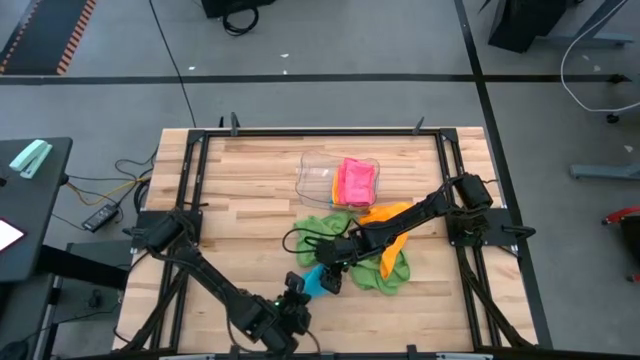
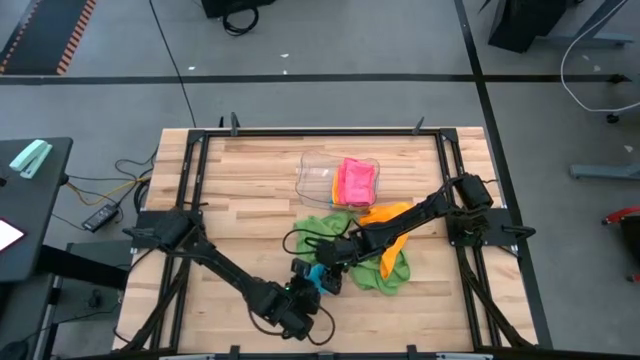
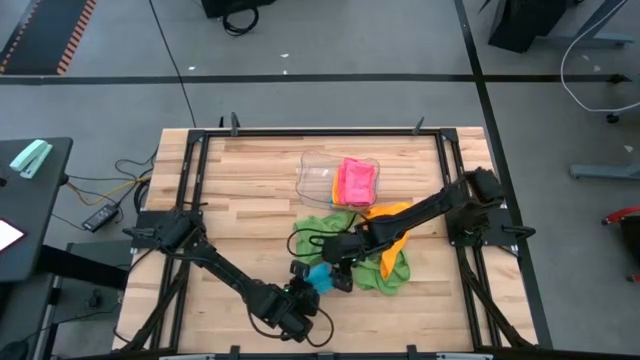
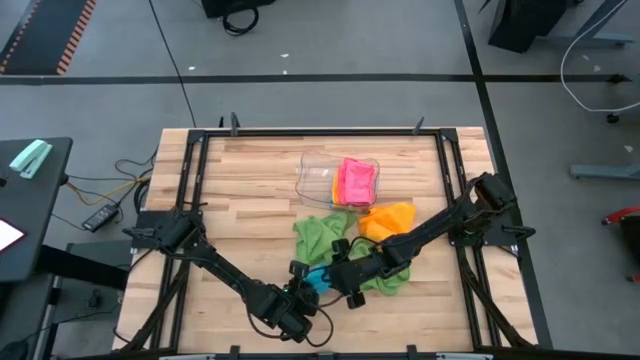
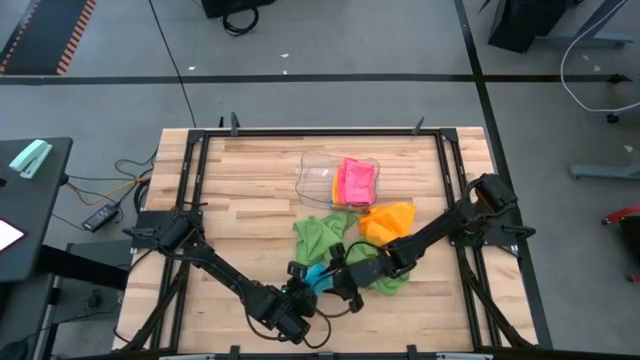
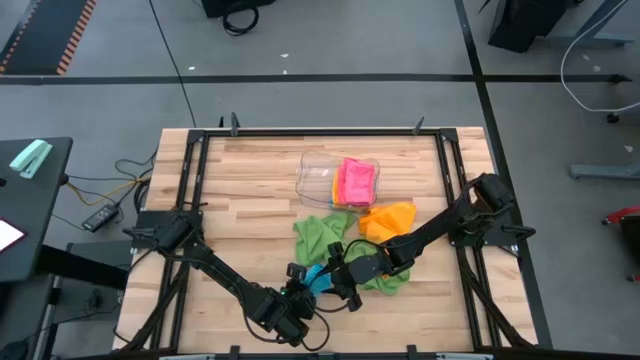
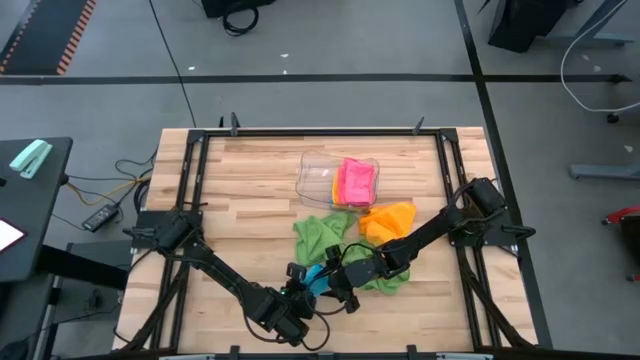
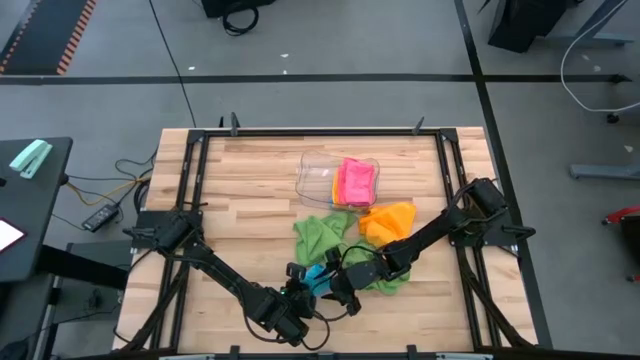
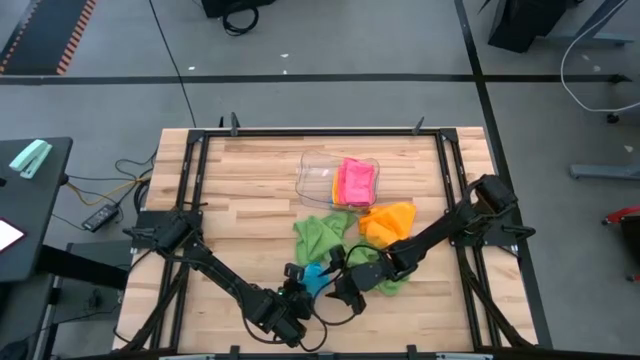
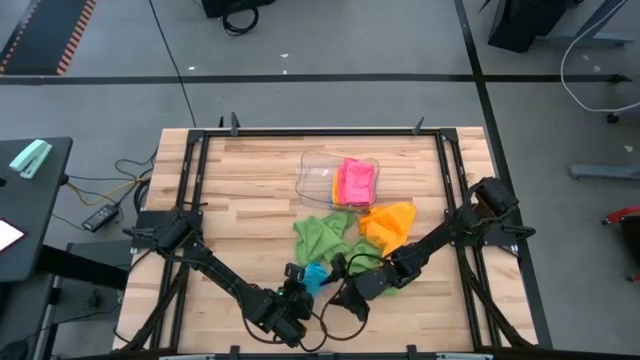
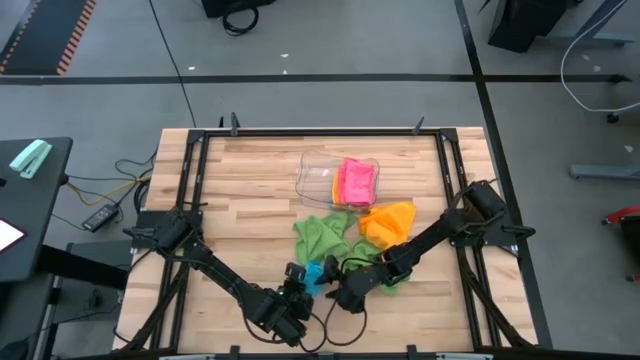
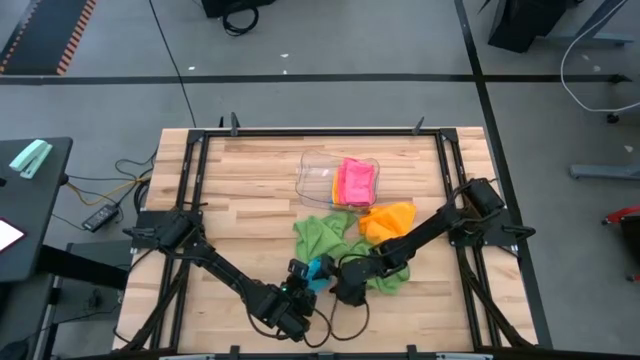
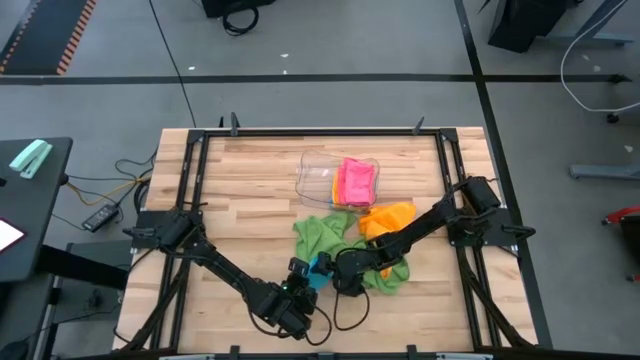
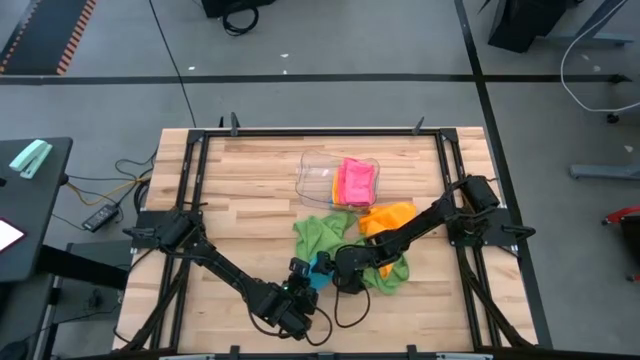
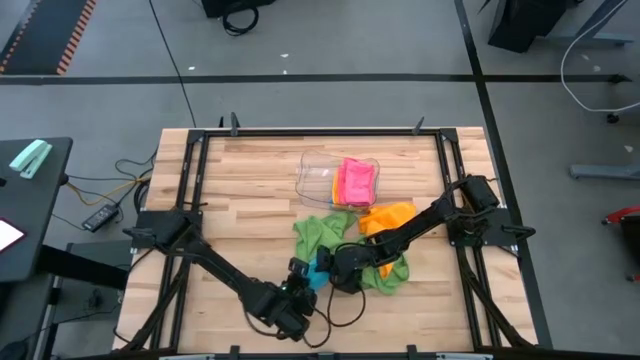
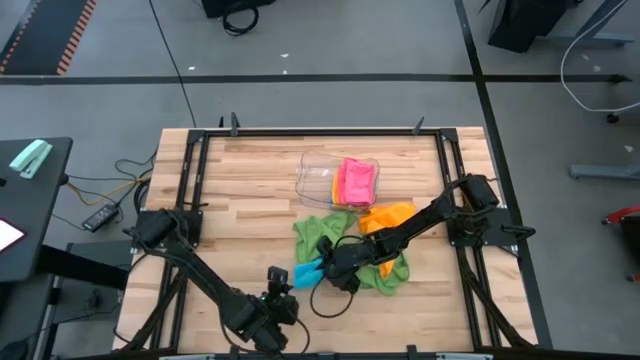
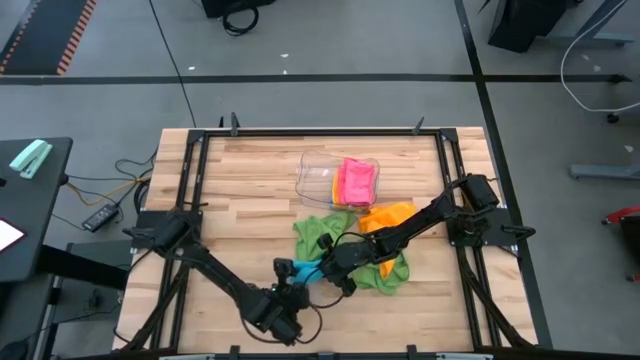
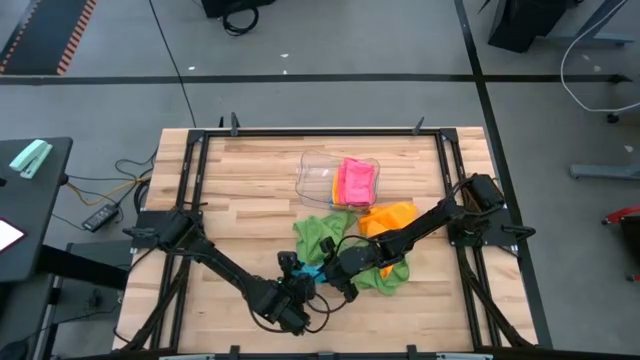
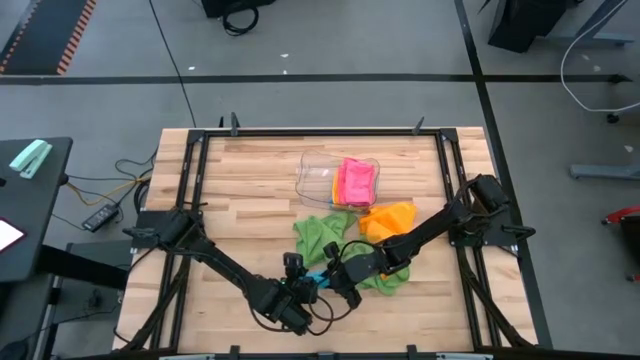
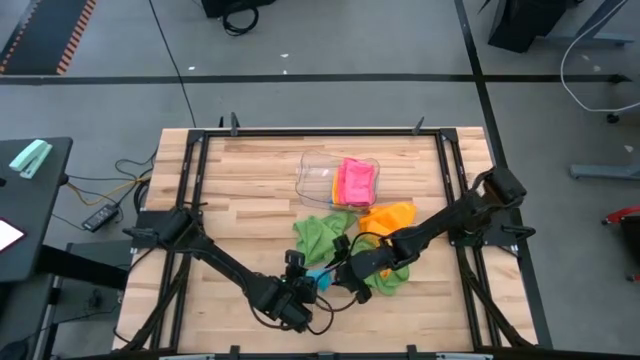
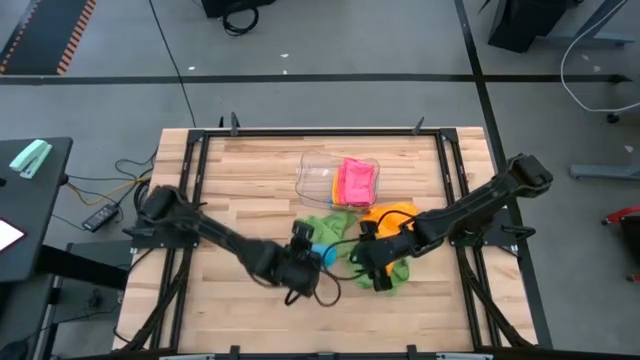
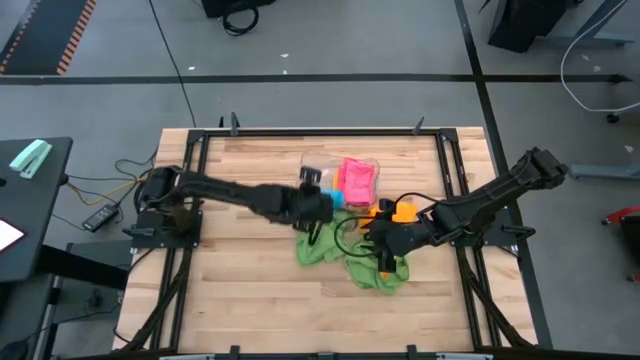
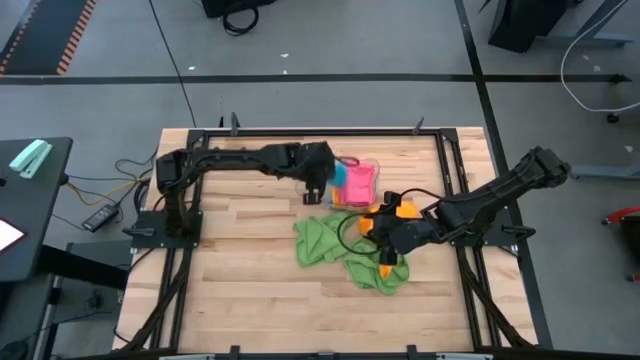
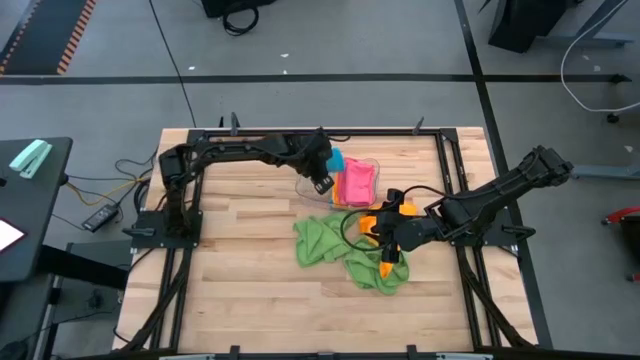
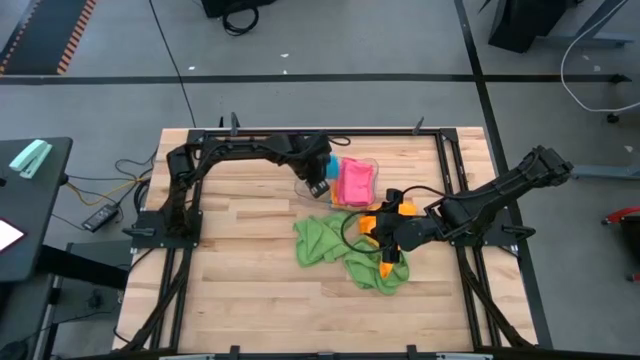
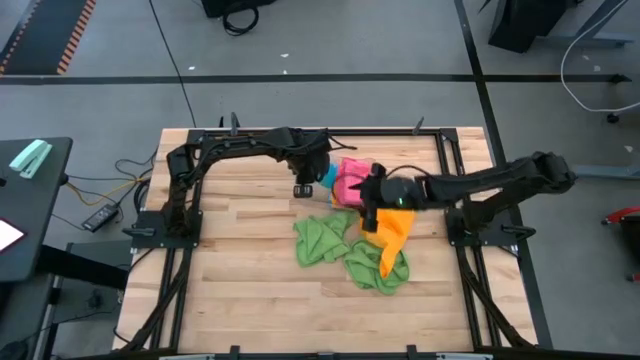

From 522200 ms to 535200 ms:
Task: Fold microfiber towels
Put the folded blue microfiber cloth into the transparent bin

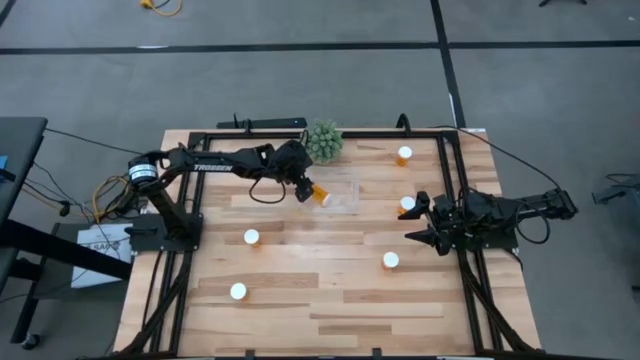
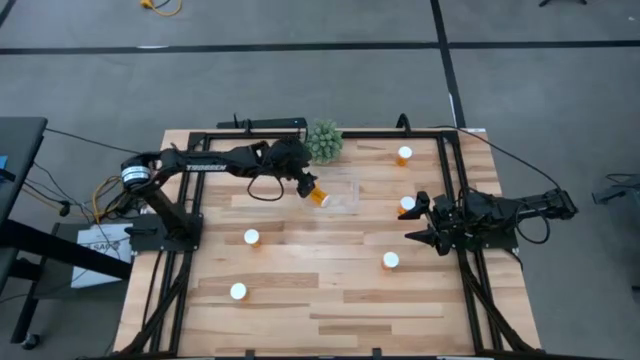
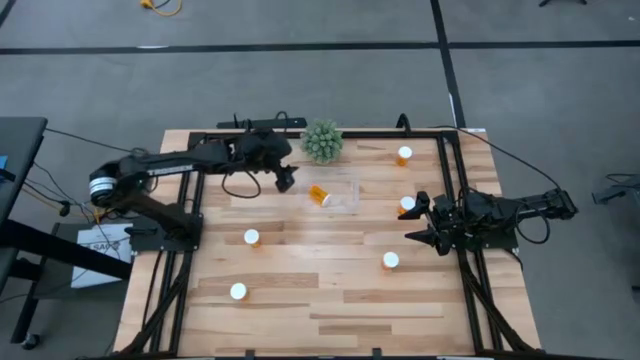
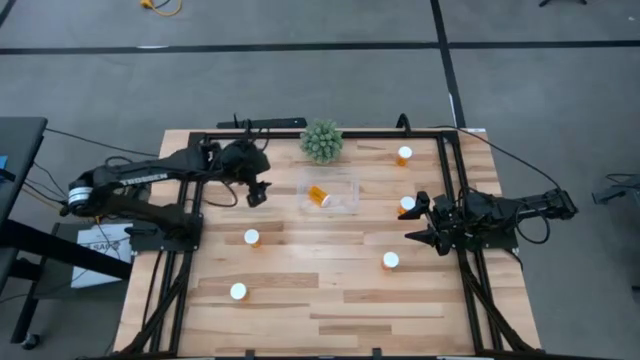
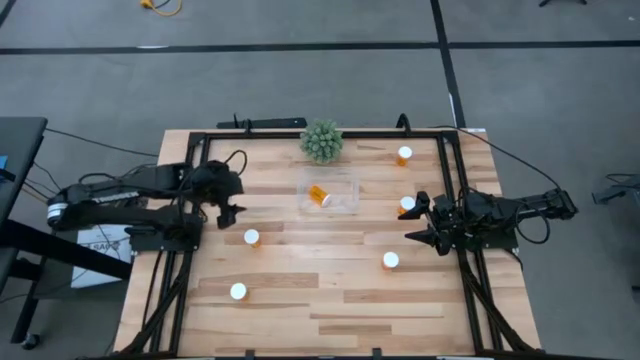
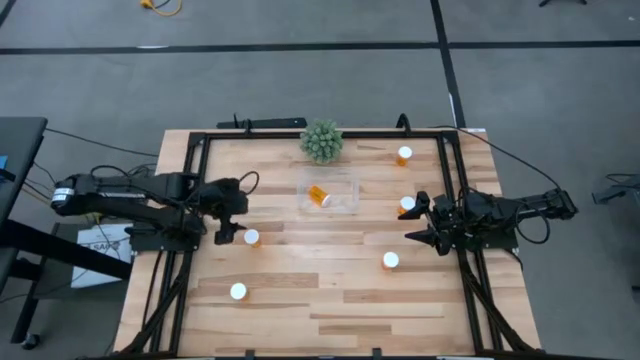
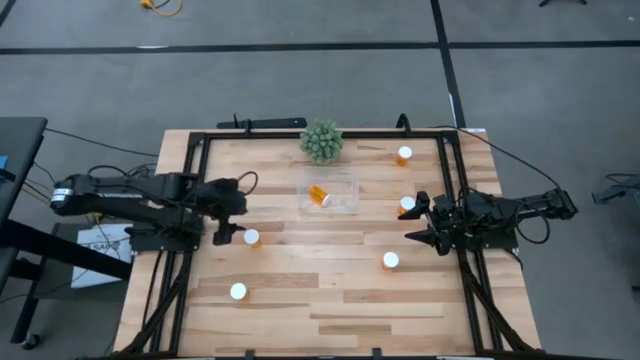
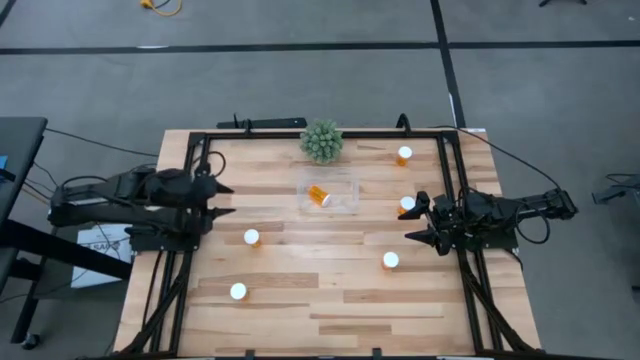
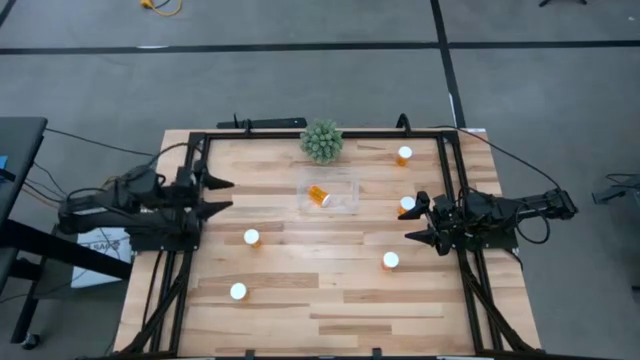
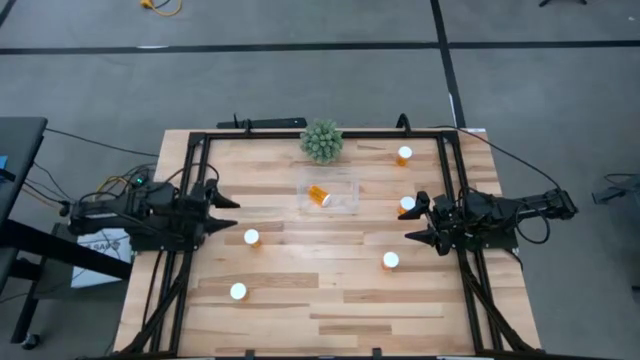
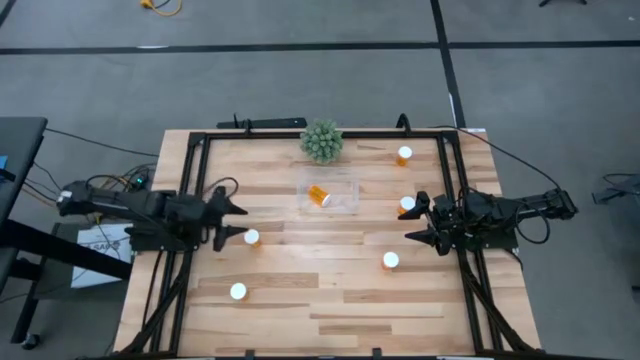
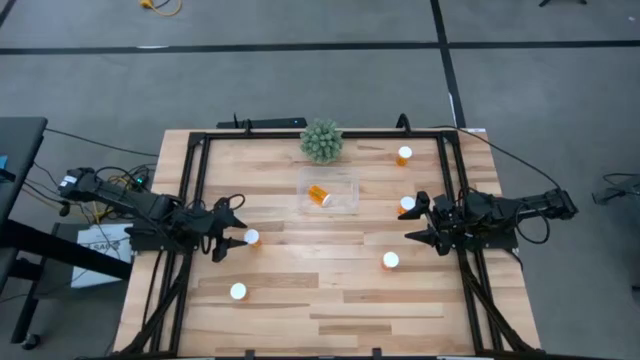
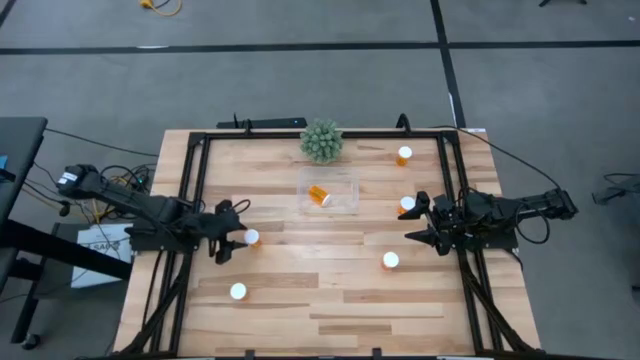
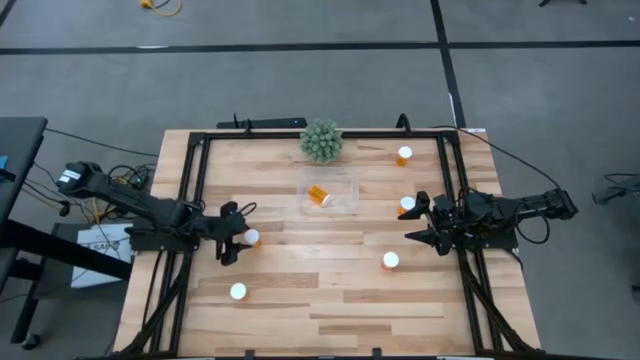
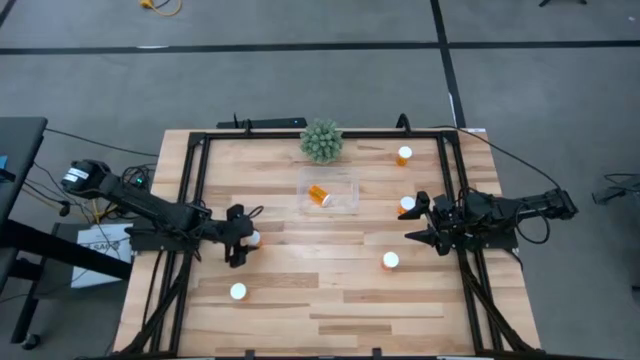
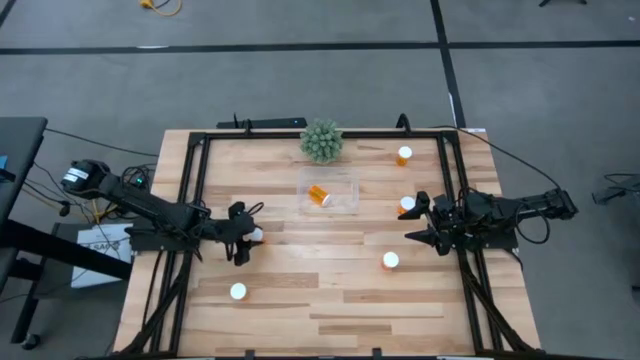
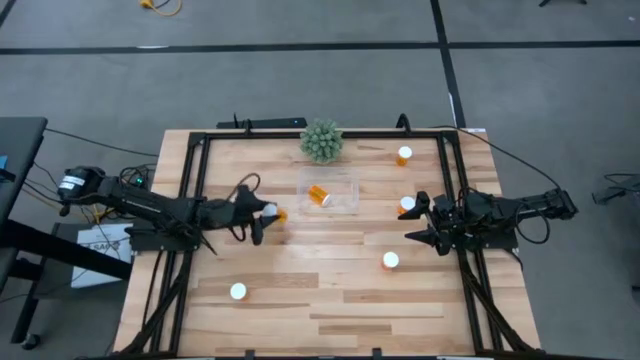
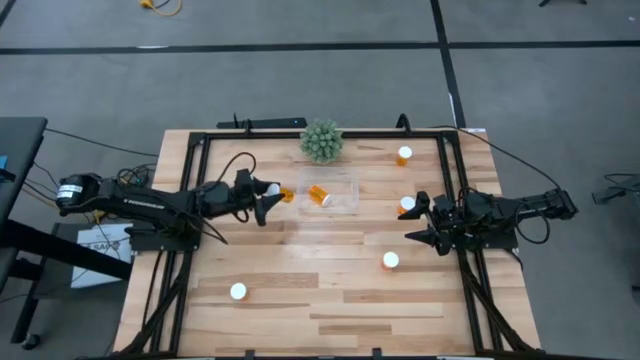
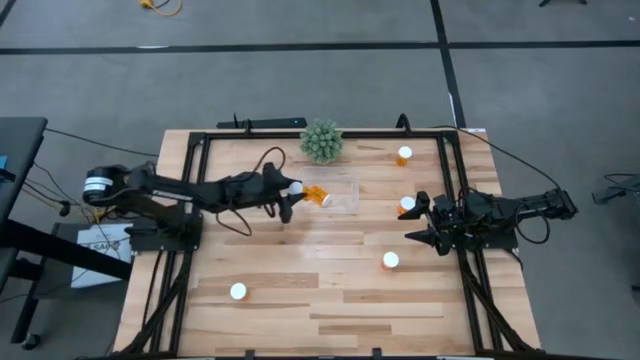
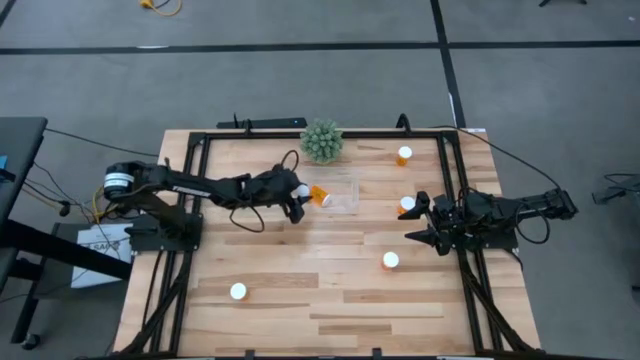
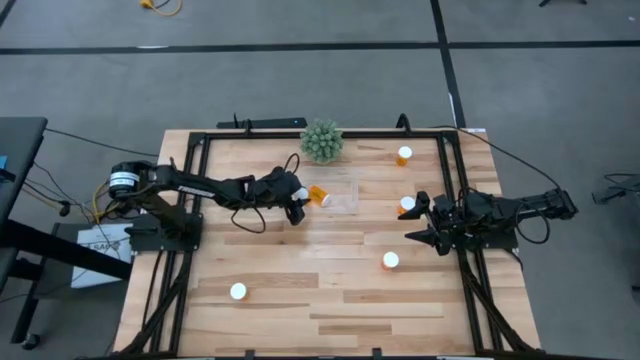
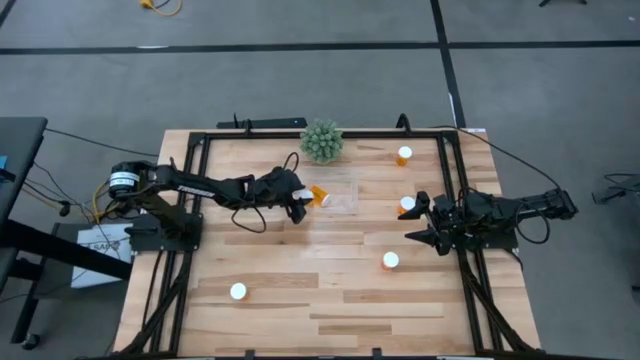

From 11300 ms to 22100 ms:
Task: Pick and place pill bottles into a basket
Put the orange pill bottle into the transparent bin
